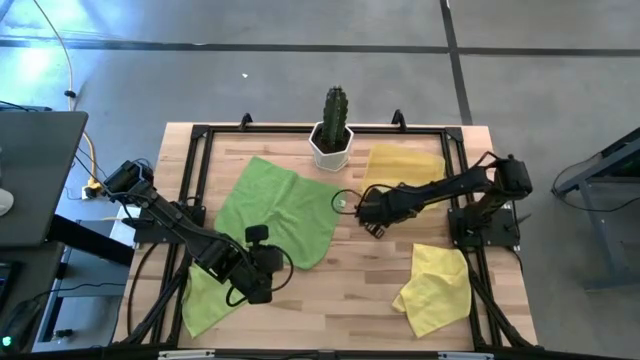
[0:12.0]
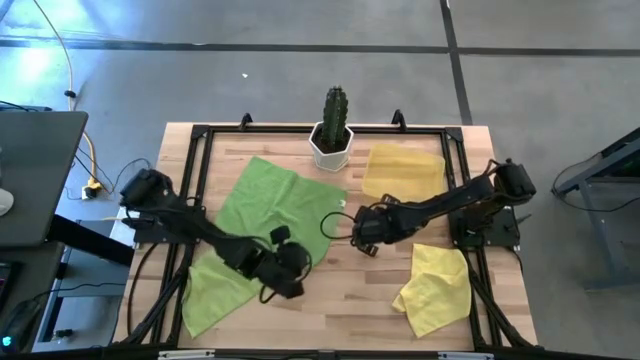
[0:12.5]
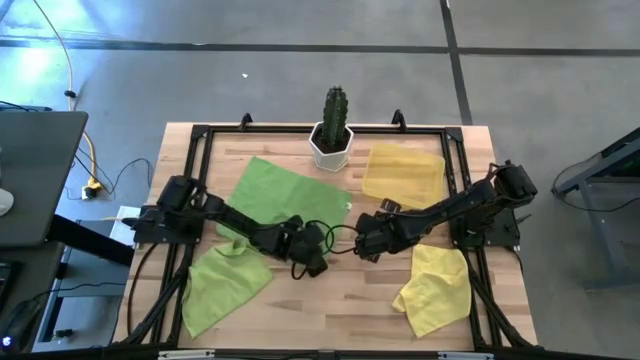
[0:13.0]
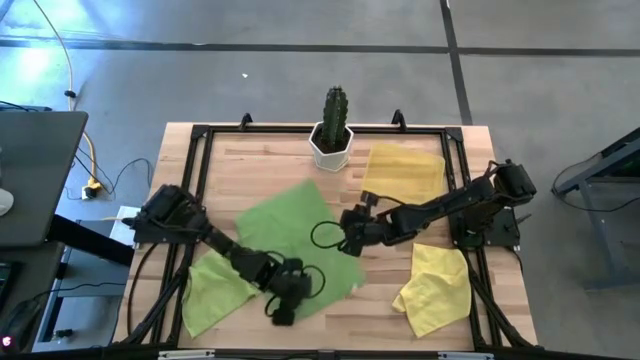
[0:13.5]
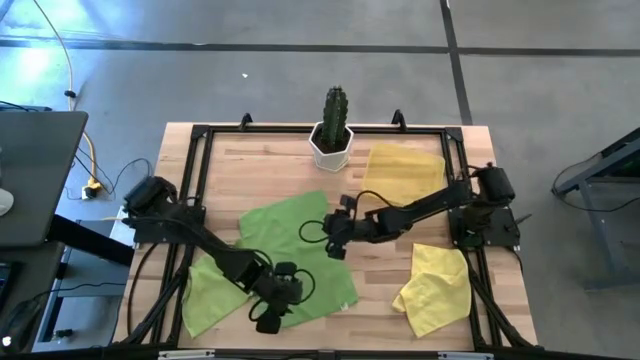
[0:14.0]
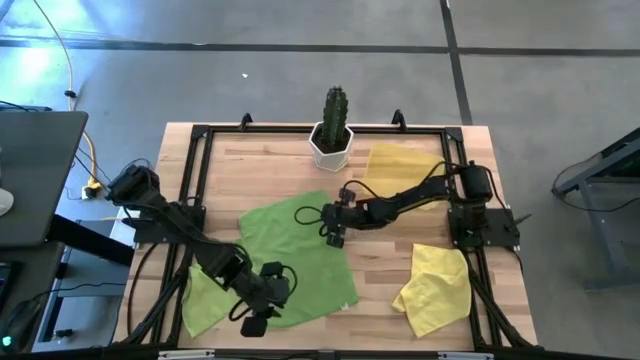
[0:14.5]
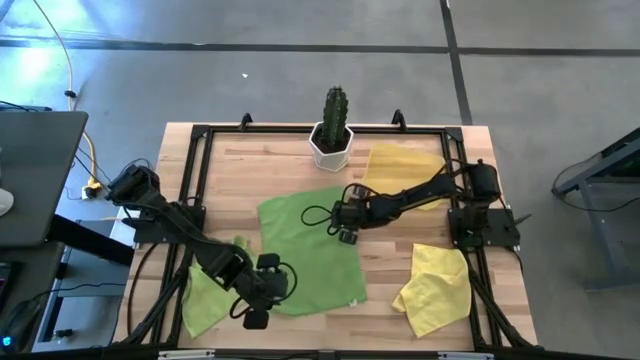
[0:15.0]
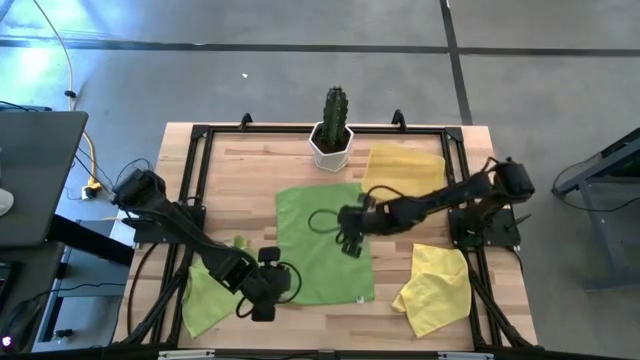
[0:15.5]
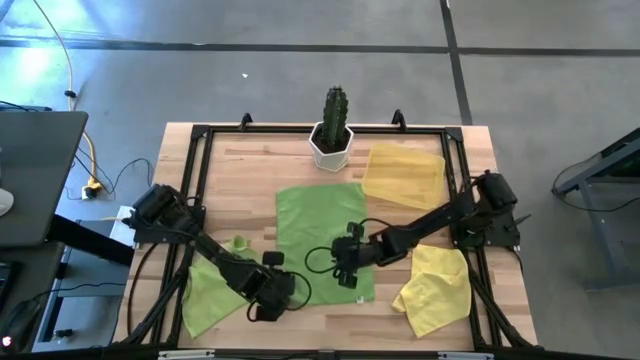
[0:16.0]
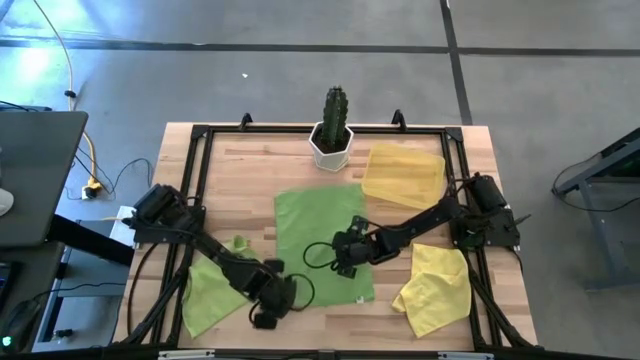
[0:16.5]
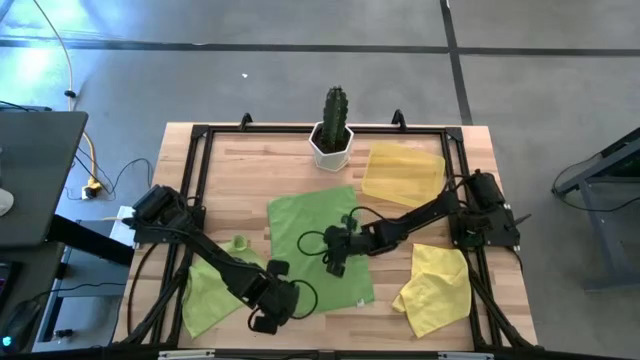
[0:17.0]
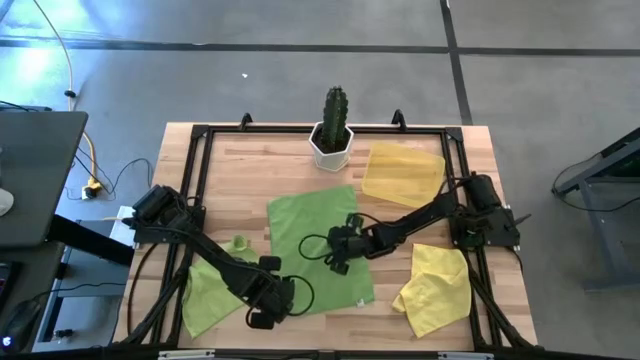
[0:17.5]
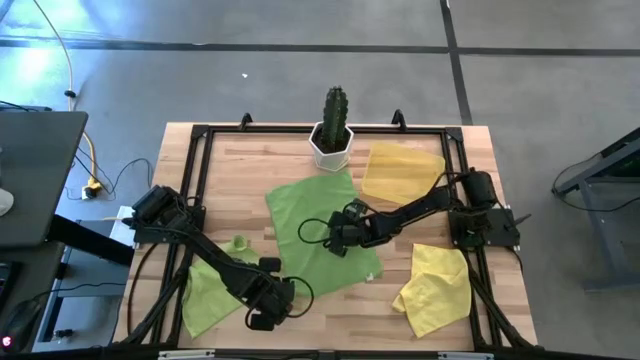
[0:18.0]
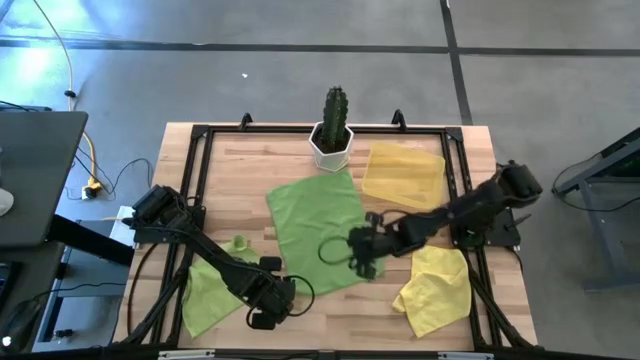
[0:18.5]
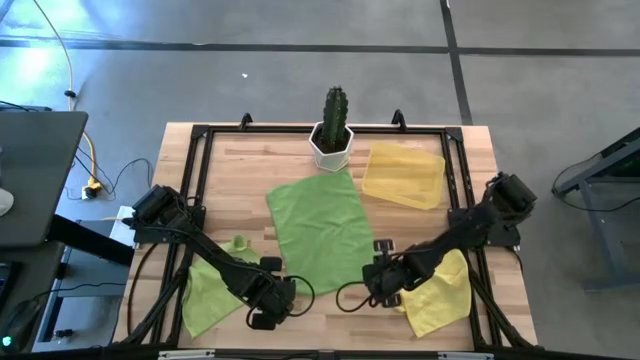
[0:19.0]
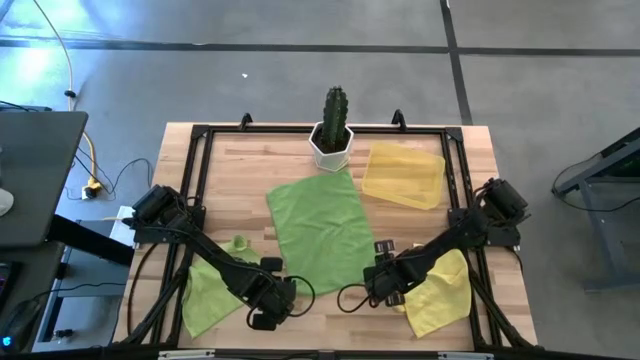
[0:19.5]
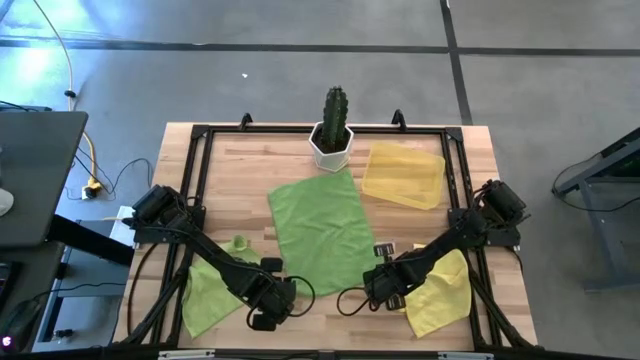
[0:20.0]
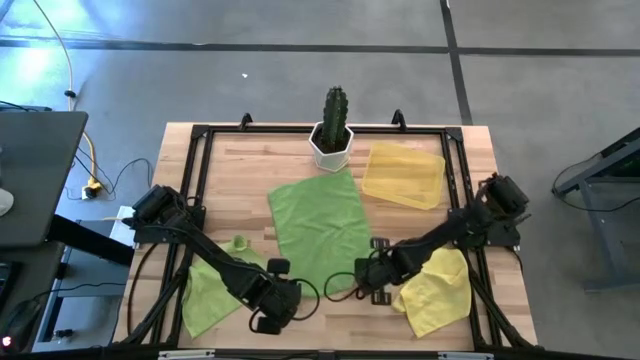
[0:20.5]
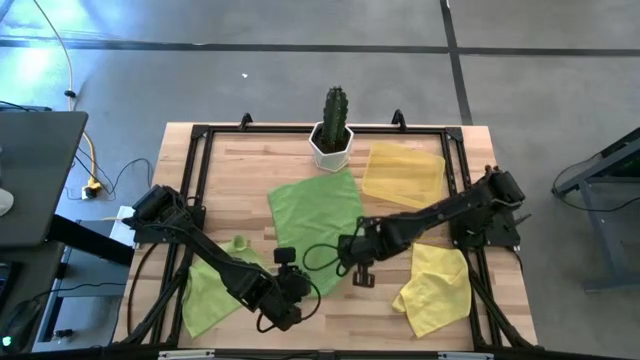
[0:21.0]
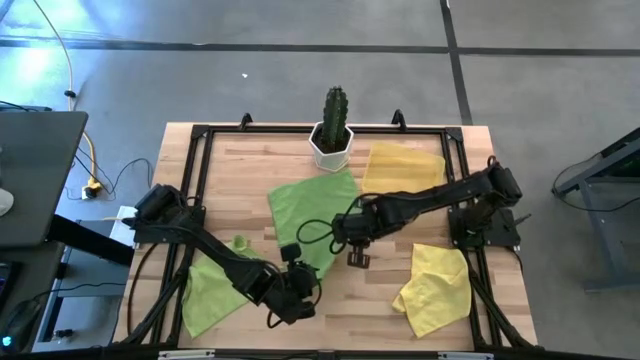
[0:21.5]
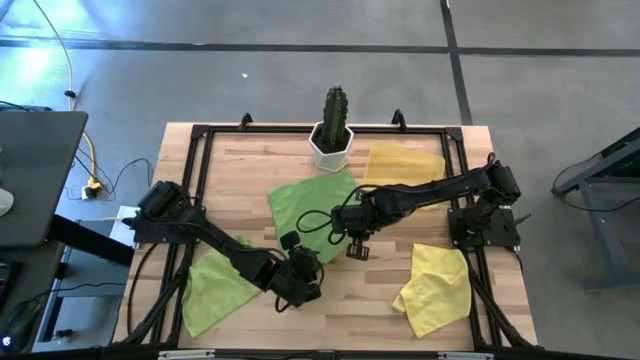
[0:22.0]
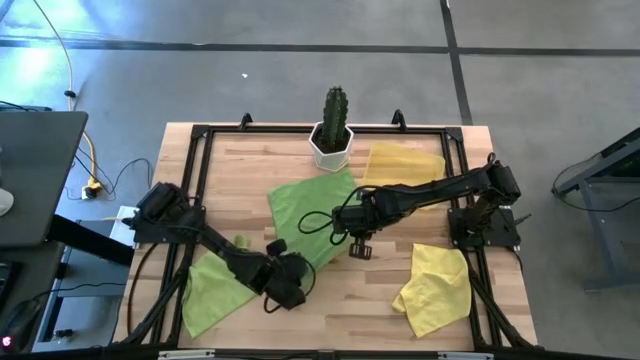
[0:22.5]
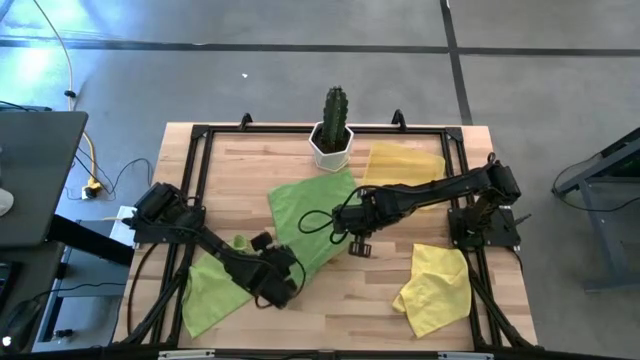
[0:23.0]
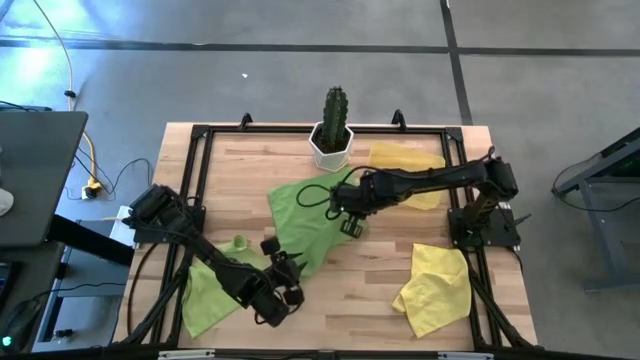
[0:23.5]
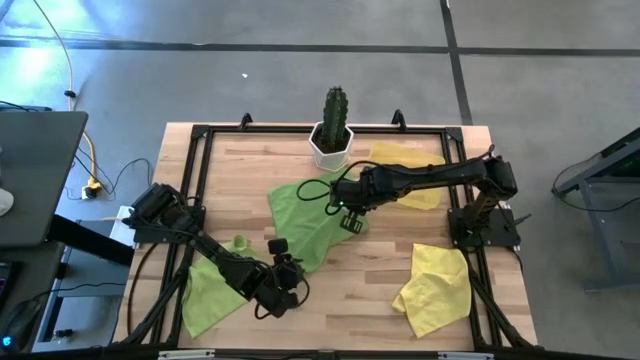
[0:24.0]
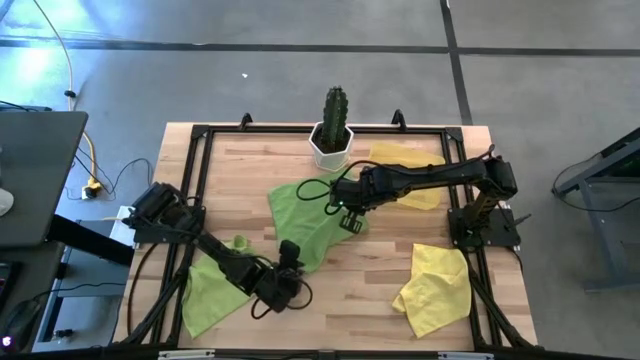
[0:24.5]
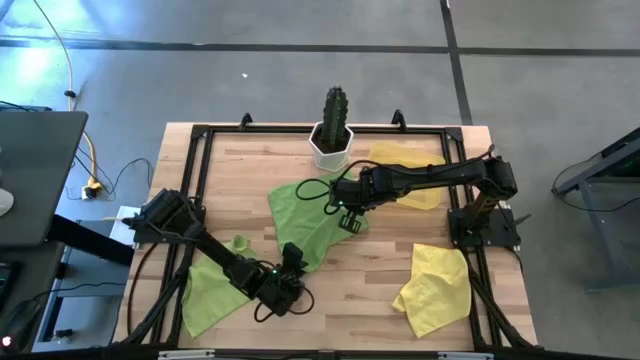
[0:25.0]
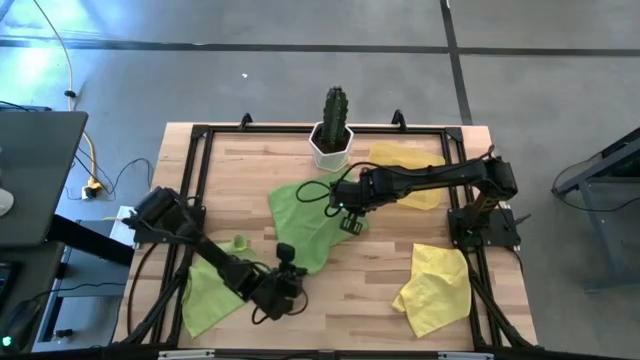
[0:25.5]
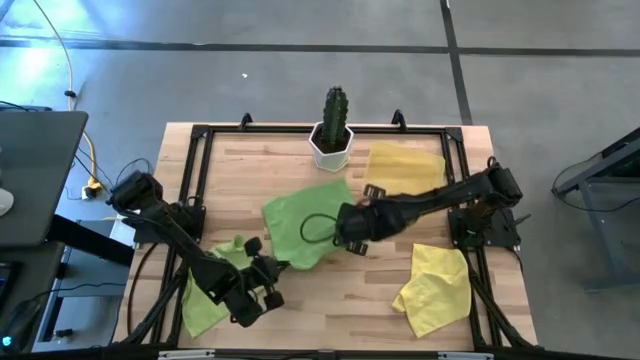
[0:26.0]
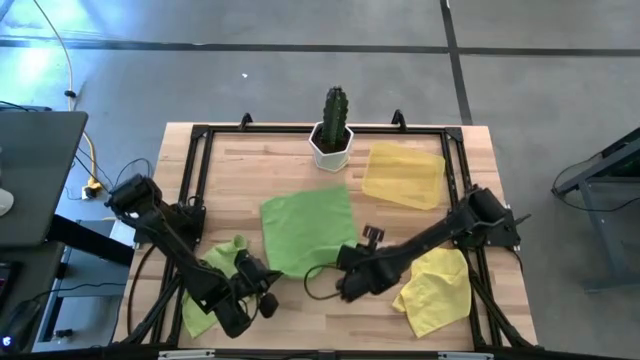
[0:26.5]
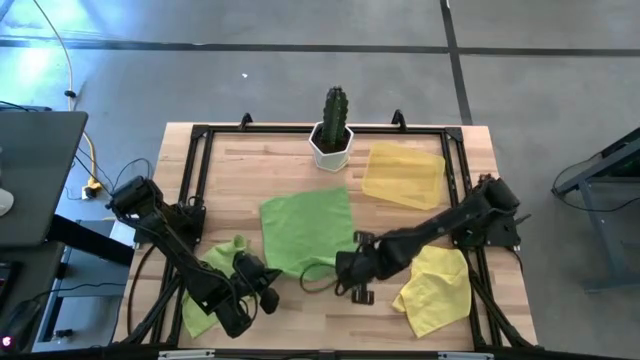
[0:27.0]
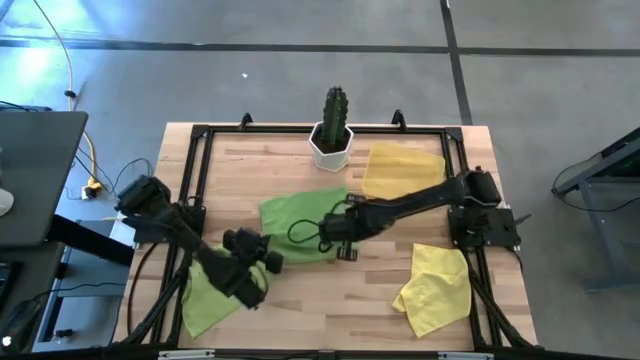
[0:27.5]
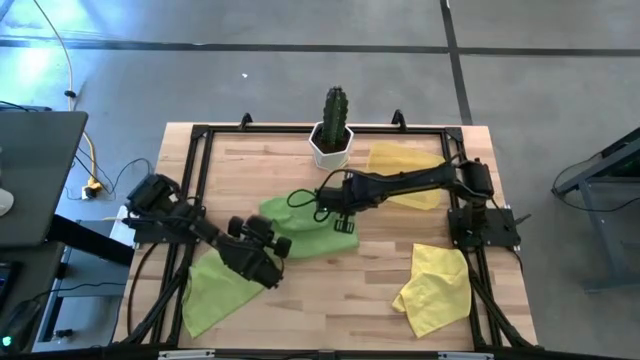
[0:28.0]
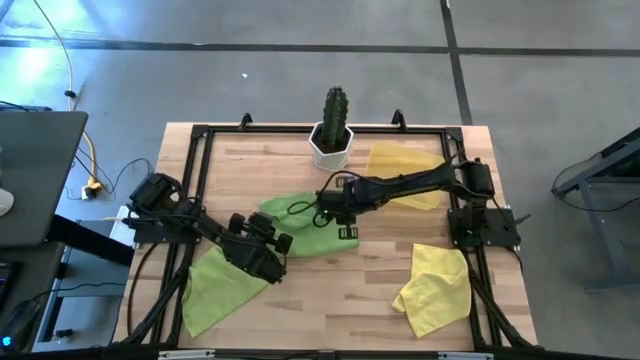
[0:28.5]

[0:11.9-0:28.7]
Task: Roll microfiber towels into tight, uniform cylinder then place into a basket
Roll the green towel

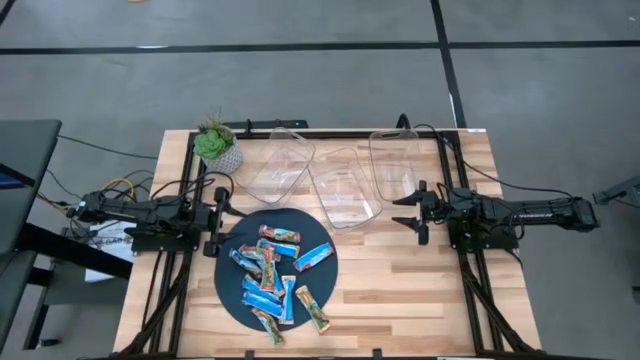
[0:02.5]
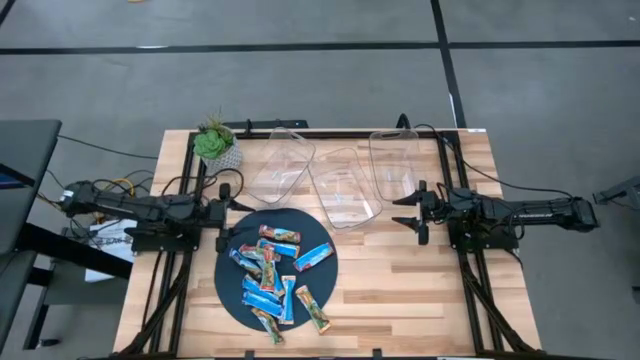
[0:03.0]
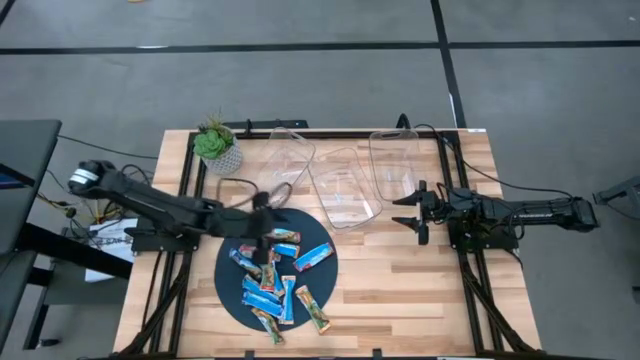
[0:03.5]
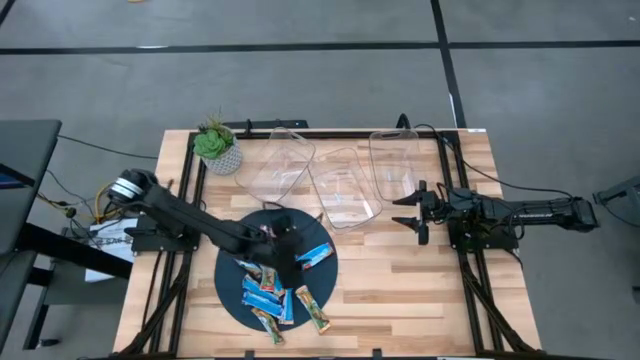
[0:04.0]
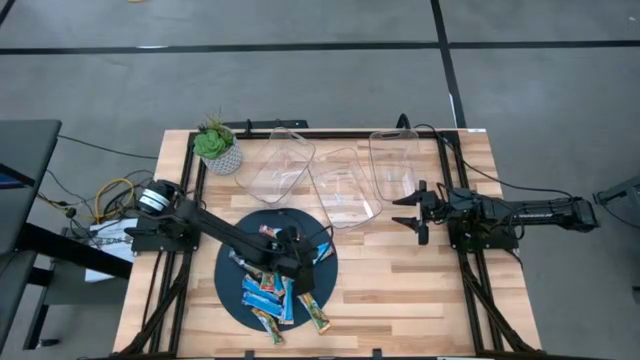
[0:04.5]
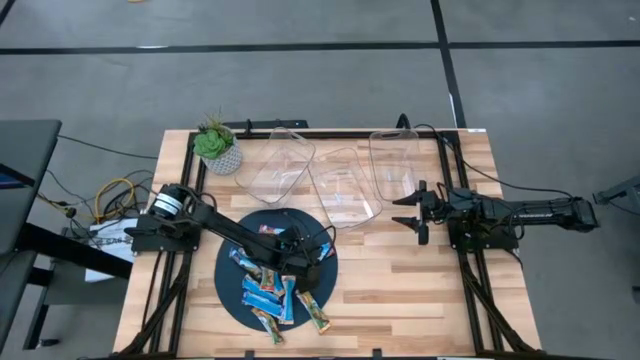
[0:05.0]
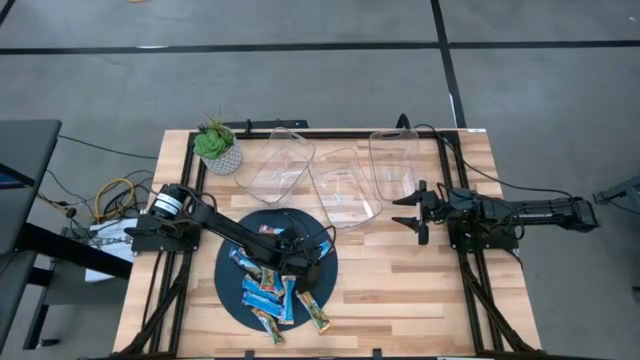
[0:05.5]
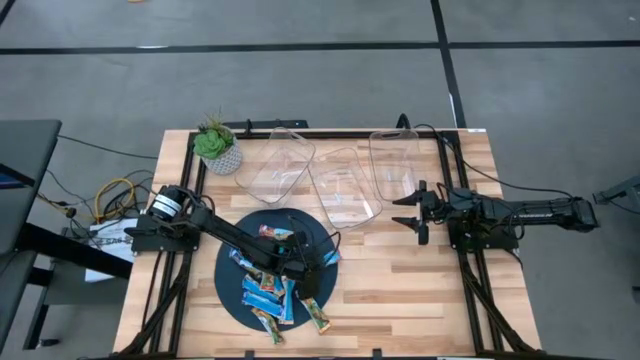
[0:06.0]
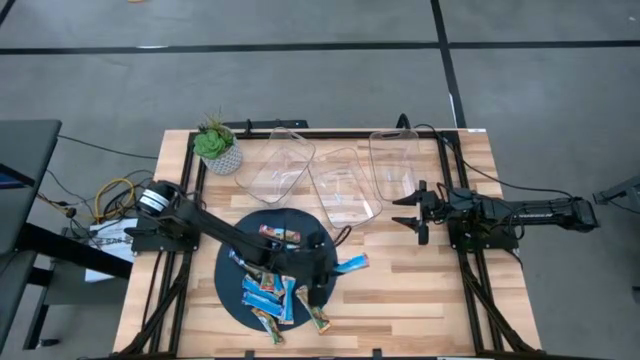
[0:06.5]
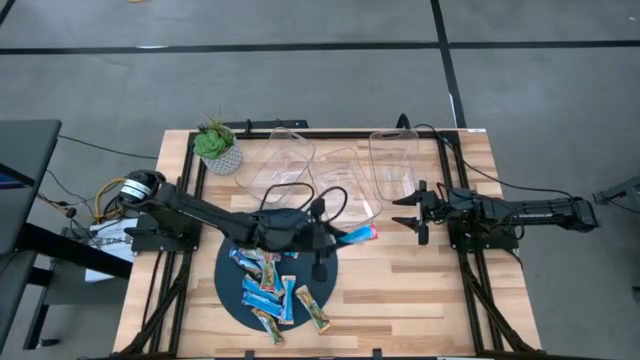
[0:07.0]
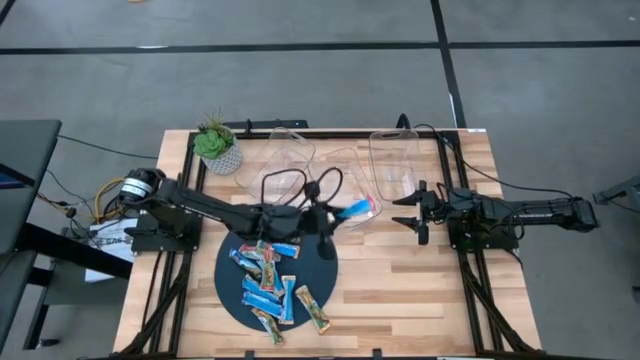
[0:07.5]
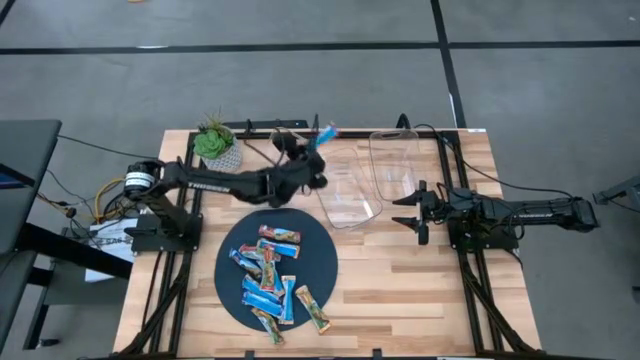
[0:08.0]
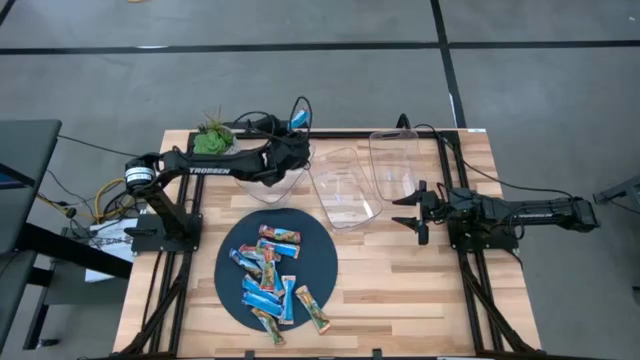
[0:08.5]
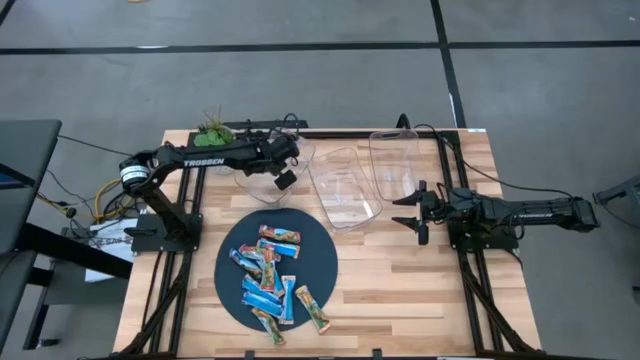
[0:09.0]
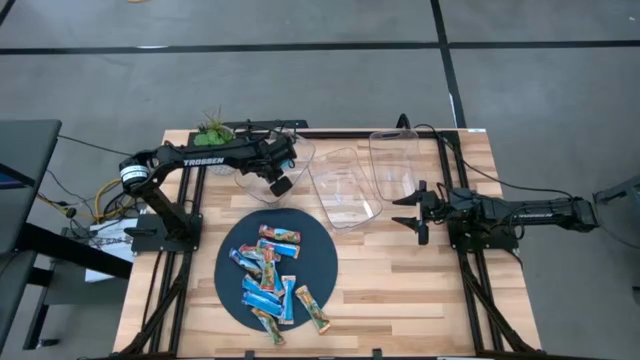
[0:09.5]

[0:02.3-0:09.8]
Task: Pick and place Granola Bars by type
Put the red granola bar into the left transparent bin
